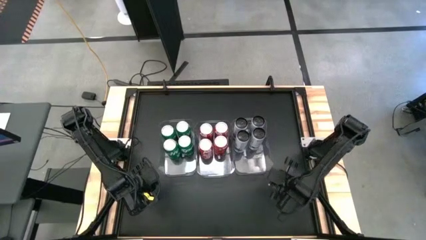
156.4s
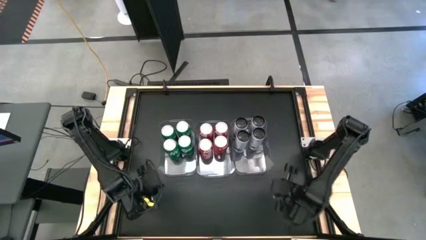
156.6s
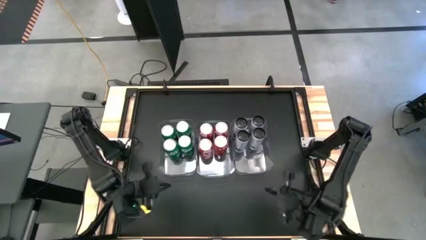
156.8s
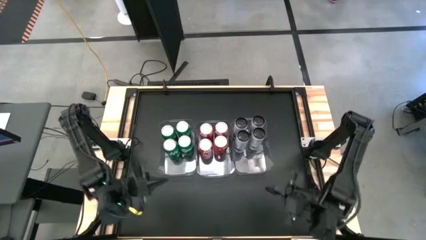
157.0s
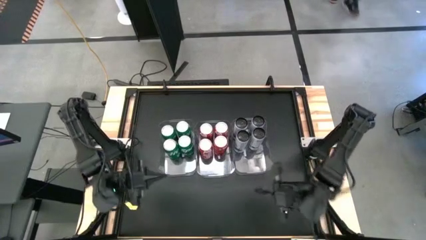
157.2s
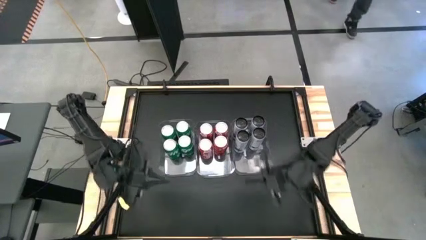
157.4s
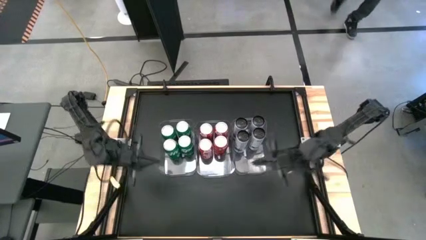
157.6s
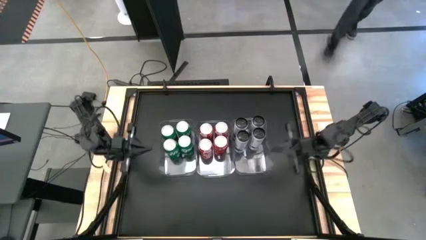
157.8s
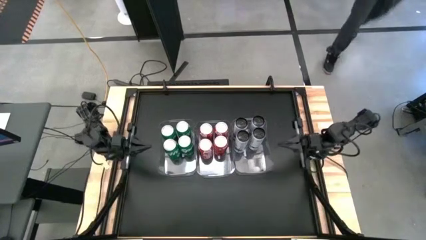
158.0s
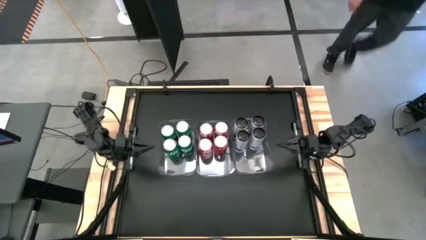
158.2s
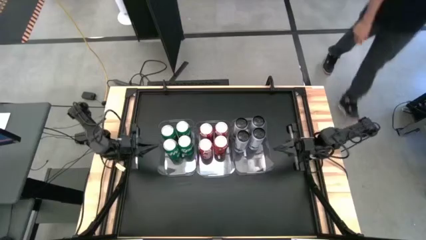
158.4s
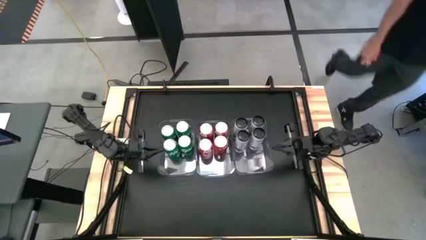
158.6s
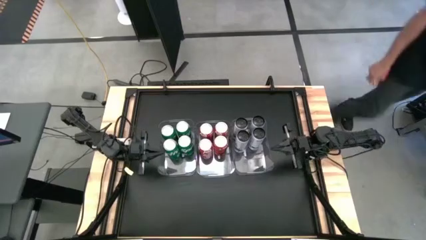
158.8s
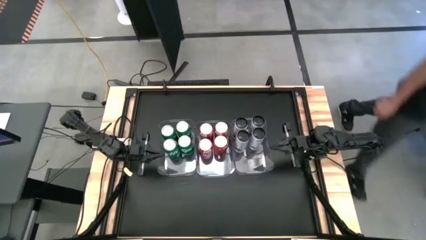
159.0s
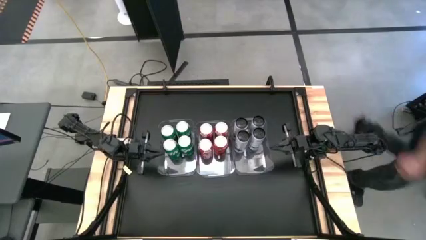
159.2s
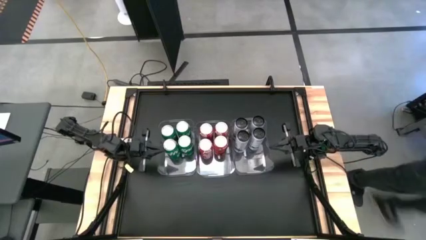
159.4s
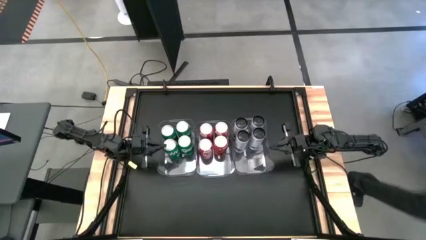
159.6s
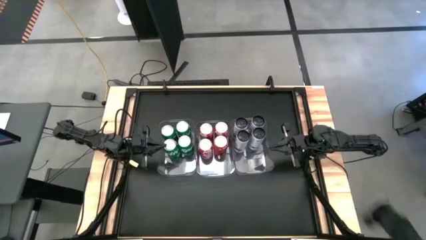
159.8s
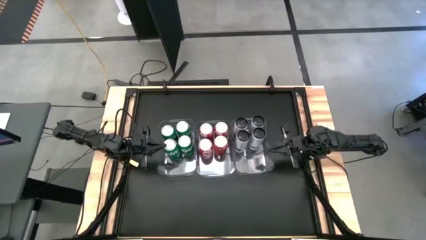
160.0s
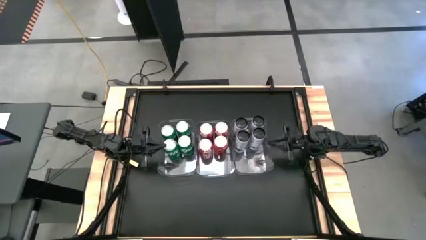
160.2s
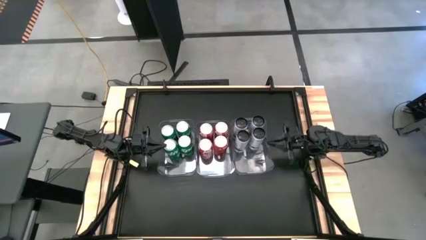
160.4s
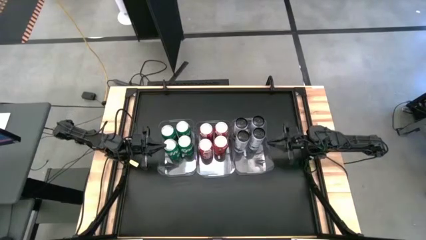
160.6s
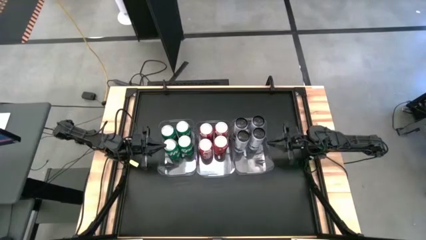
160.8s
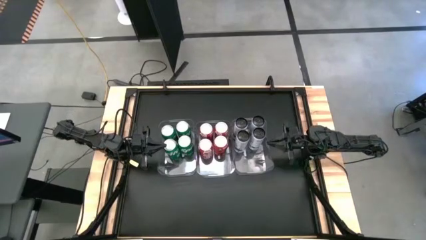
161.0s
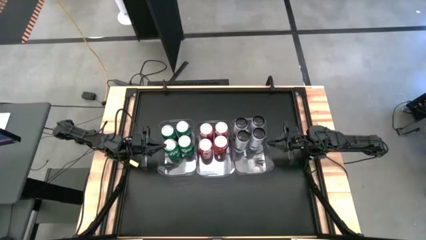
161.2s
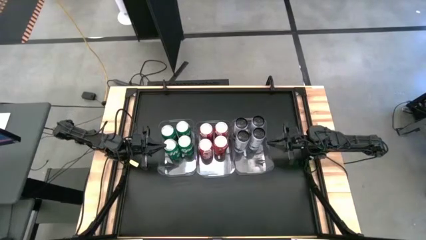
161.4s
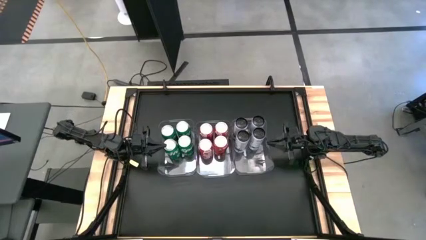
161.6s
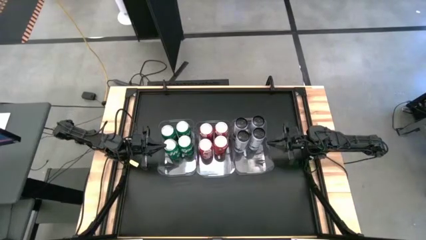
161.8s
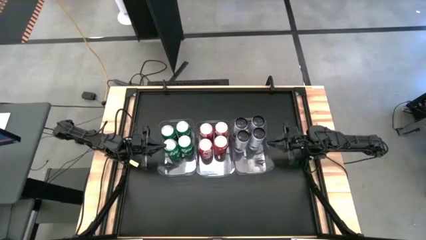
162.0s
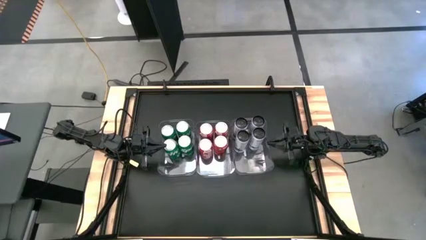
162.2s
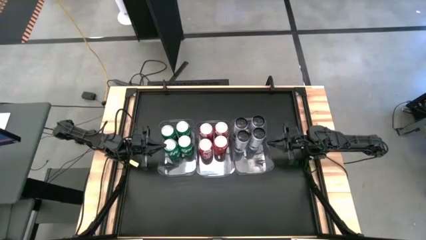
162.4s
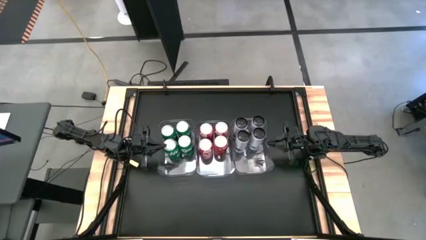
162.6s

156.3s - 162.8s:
Task: Sort soda cans
Return to Home Position

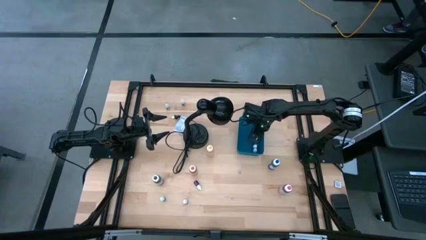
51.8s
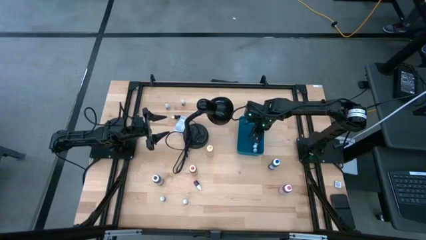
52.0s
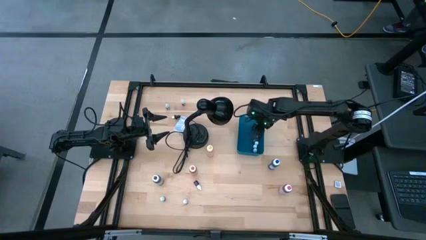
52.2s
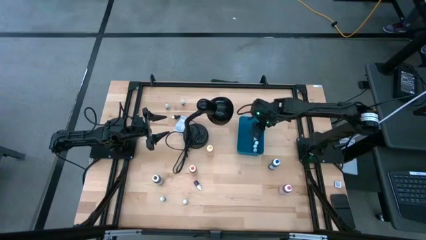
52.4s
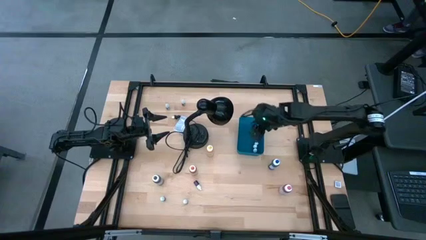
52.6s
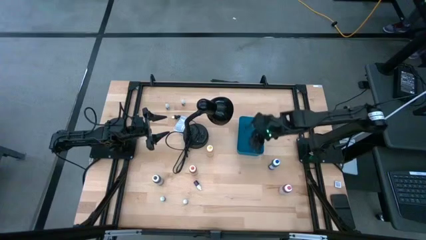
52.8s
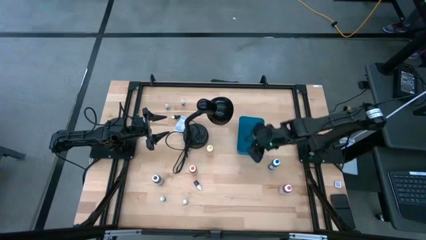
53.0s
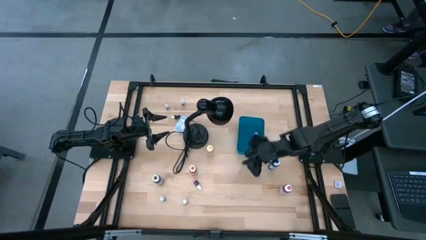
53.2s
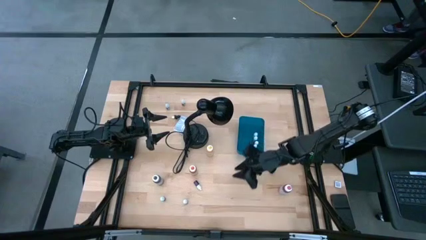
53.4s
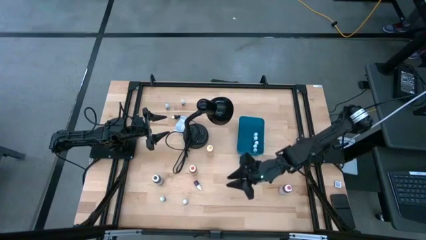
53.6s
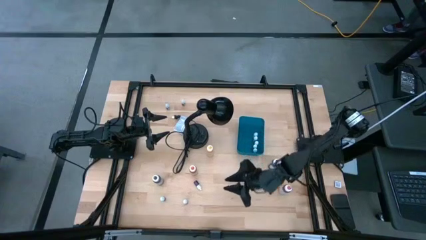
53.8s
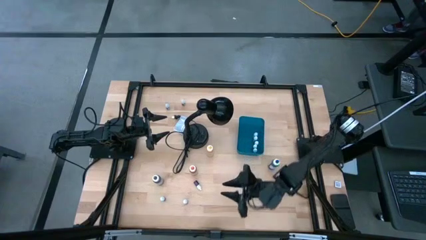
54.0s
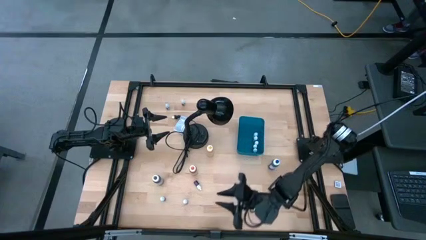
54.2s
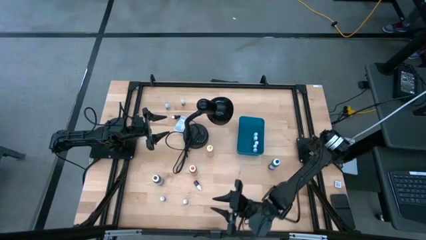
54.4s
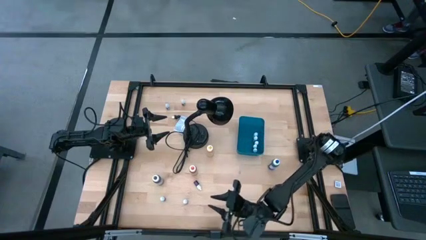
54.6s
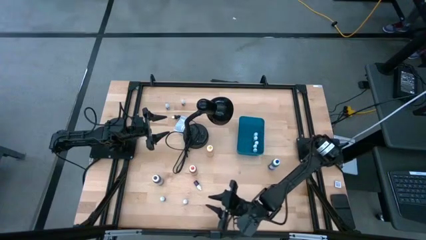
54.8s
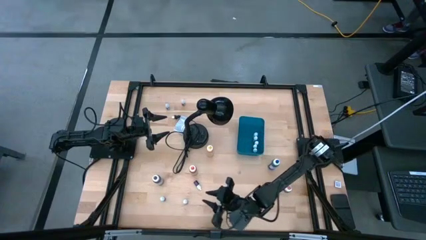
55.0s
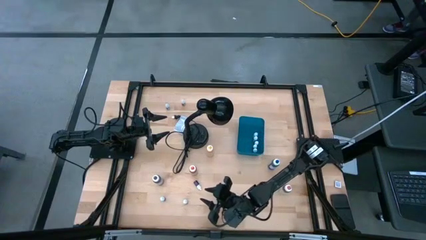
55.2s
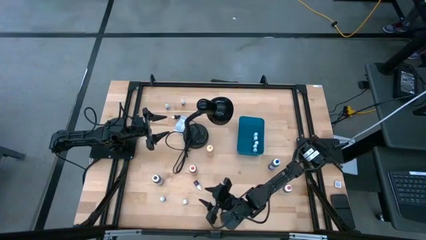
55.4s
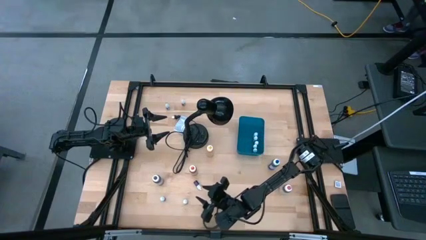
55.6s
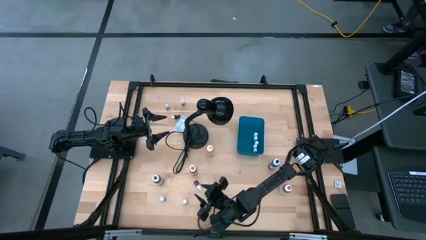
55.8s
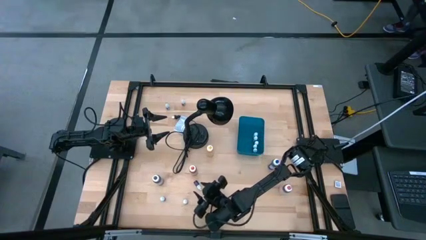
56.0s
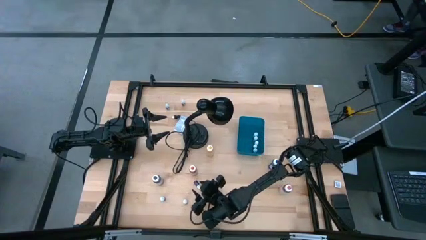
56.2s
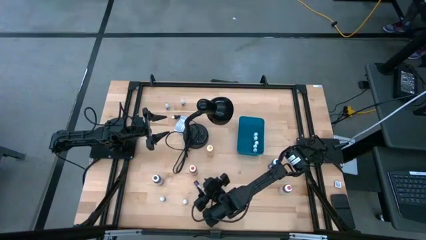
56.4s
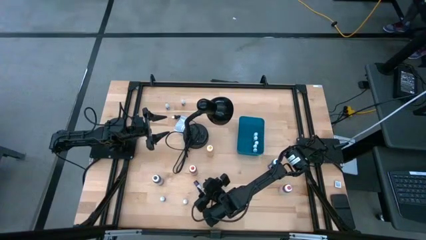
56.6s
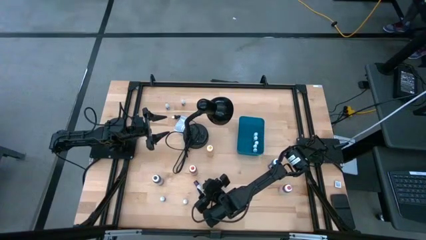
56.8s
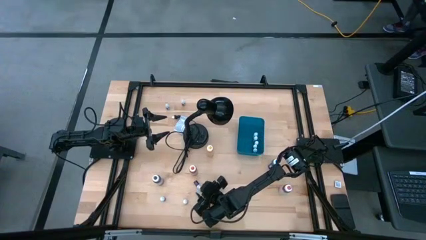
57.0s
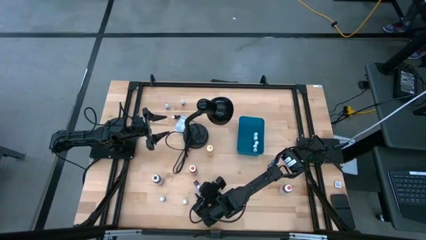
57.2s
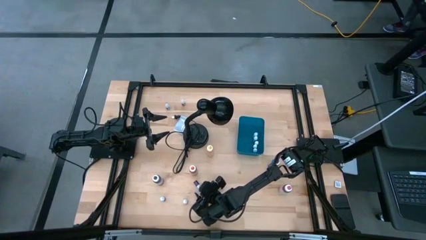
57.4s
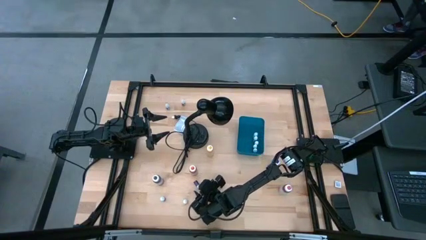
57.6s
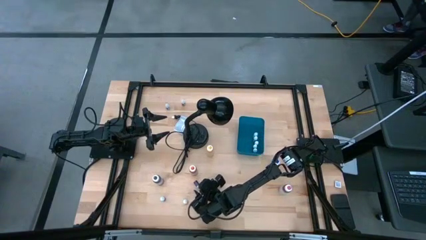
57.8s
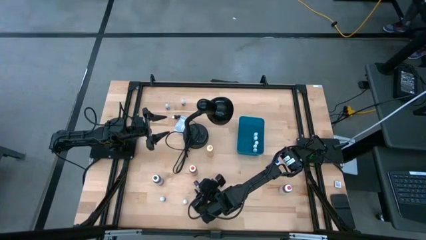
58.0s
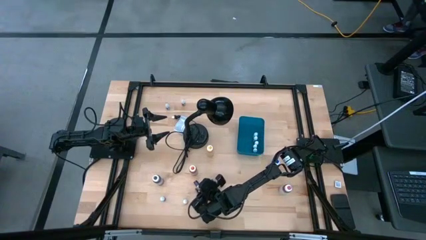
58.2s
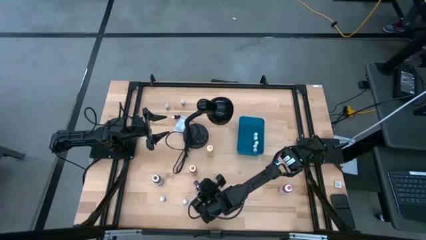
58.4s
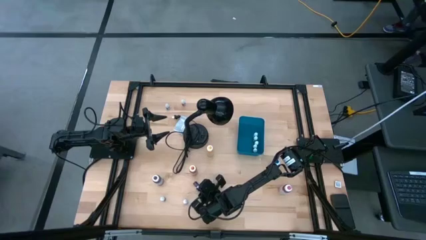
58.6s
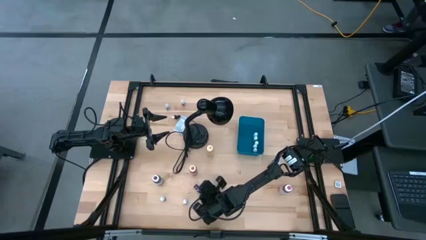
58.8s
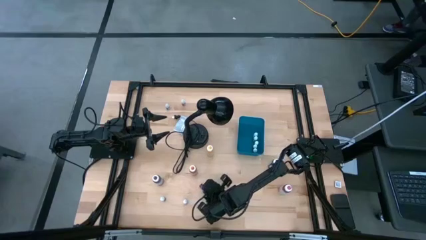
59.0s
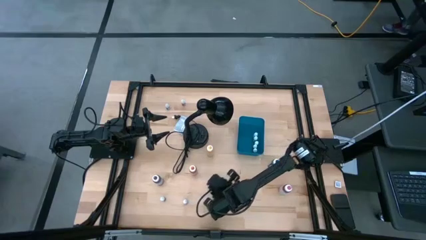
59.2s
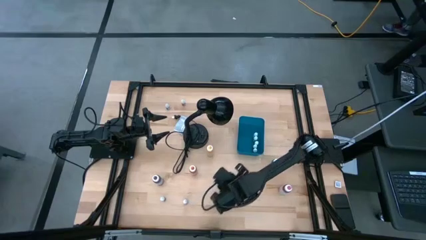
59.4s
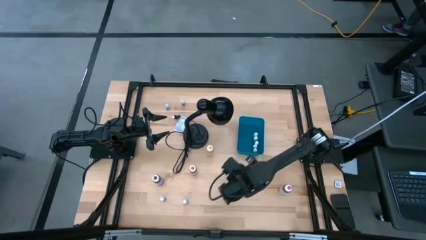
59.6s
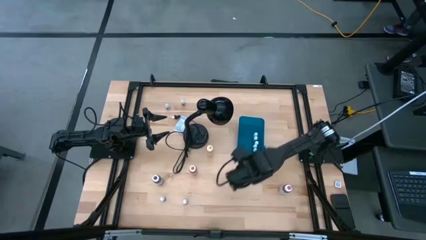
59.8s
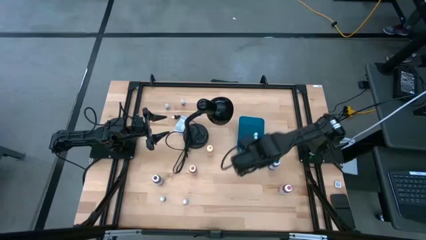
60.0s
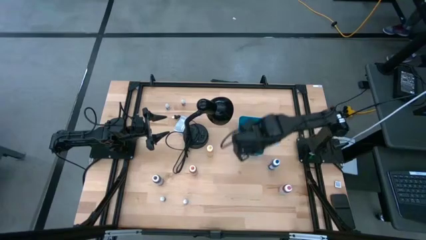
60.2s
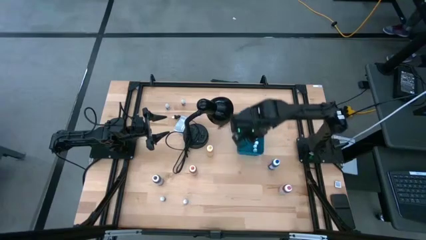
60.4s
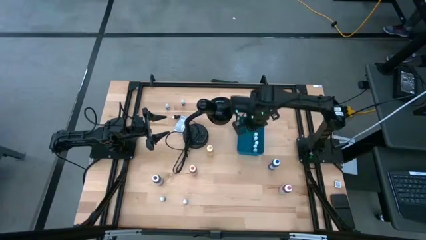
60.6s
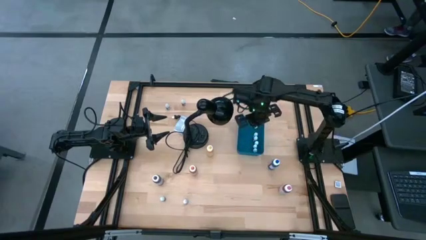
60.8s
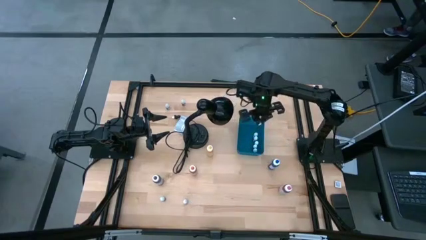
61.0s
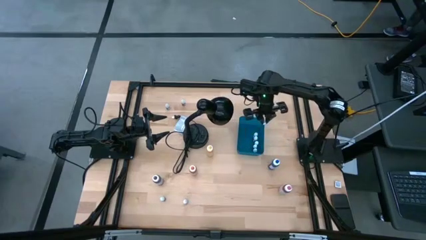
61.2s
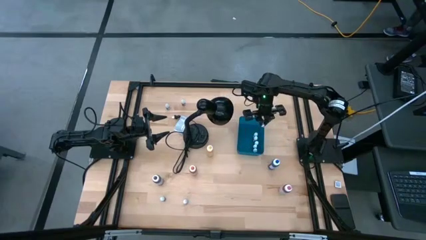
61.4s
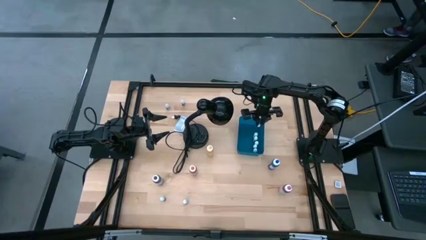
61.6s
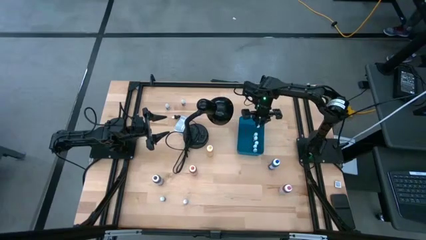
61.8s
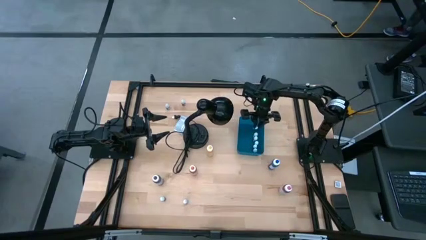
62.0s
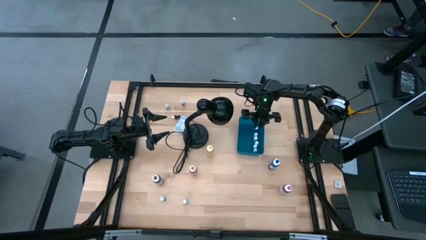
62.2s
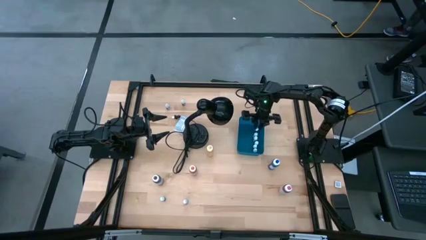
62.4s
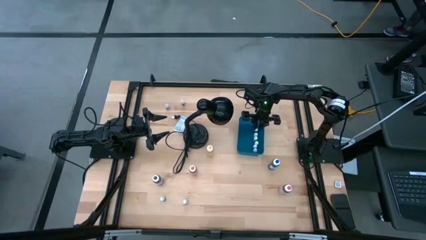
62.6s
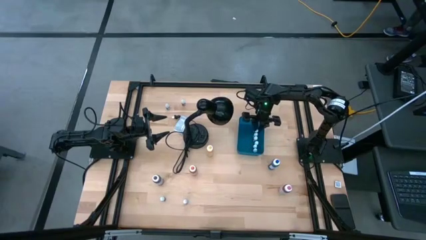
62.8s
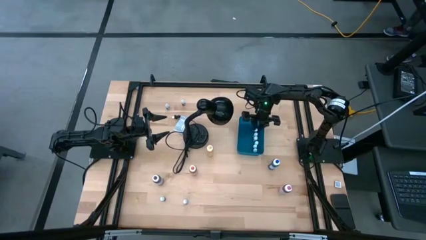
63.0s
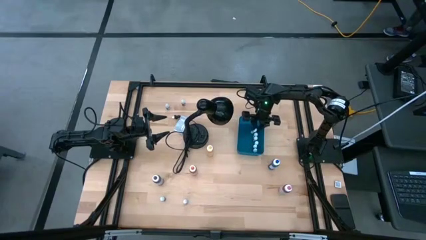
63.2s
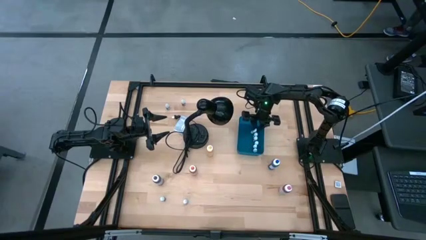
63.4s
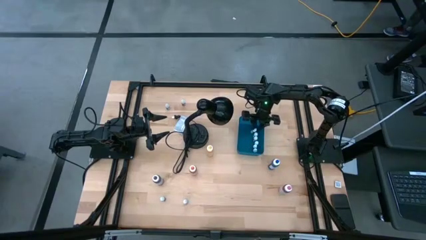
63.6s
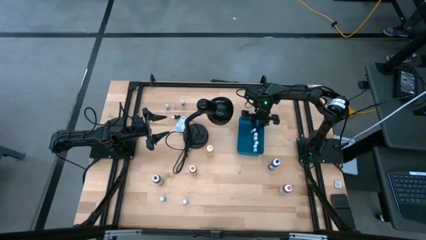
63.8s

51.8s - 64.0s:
Task: Pick & Place food coloring
Put the small purple food coloring bottle into the blue bin
